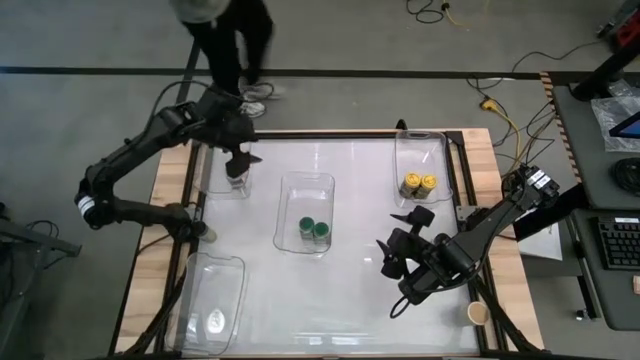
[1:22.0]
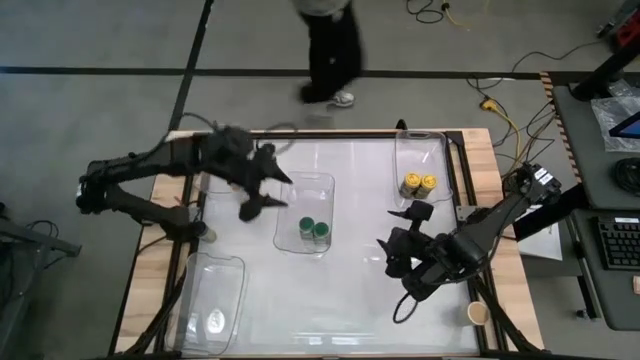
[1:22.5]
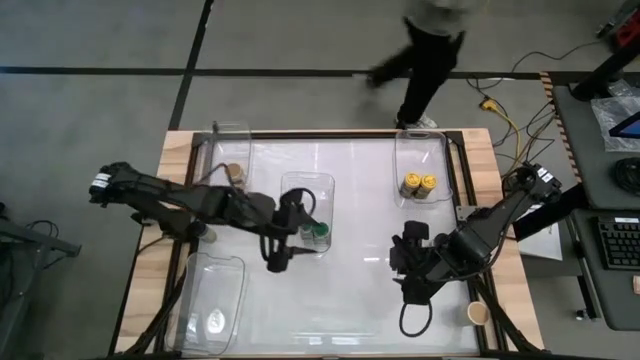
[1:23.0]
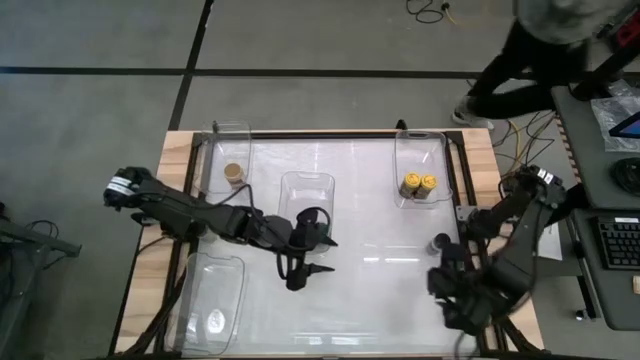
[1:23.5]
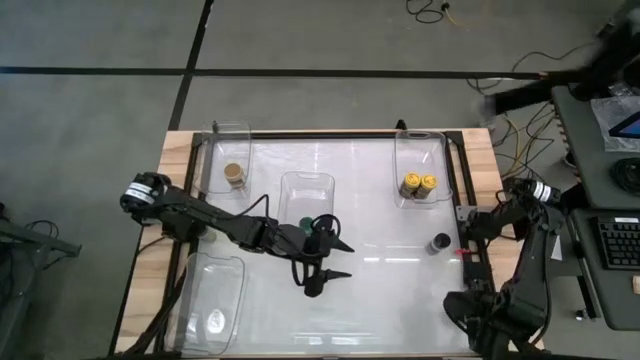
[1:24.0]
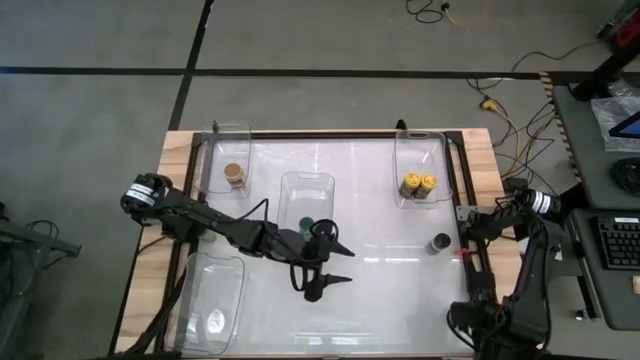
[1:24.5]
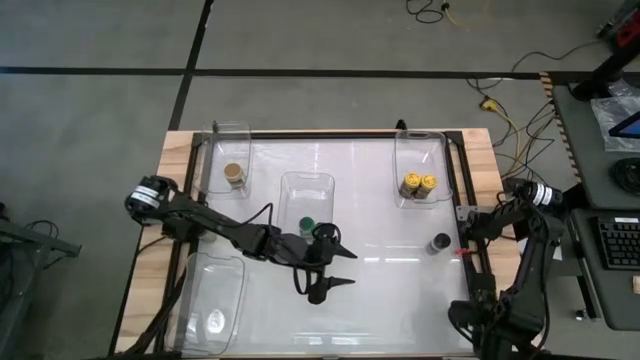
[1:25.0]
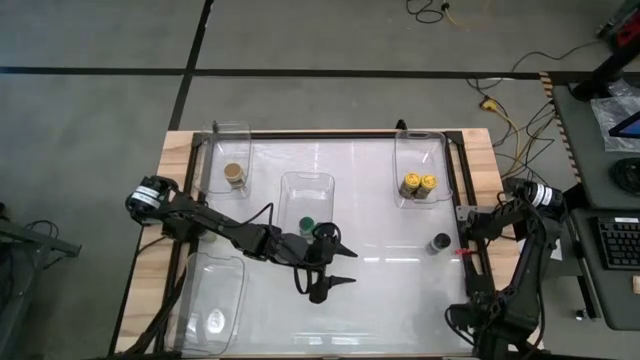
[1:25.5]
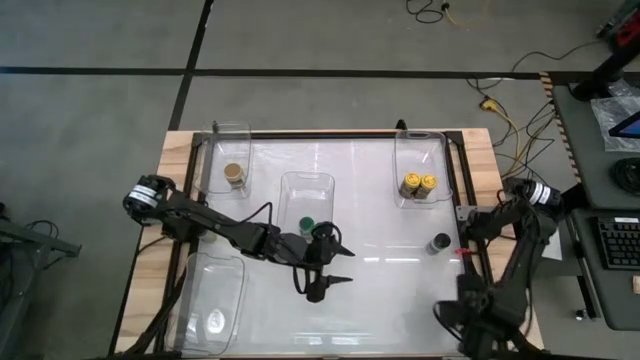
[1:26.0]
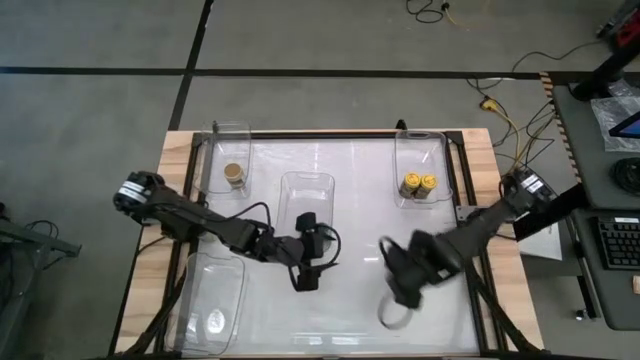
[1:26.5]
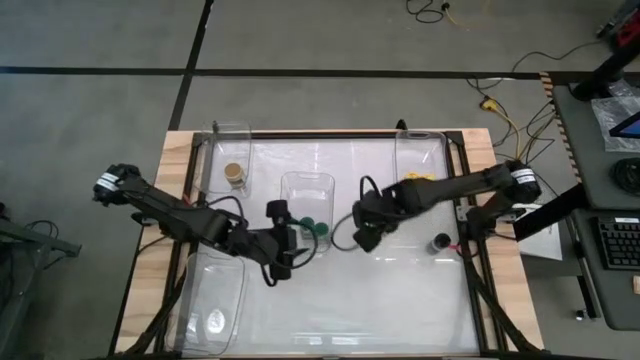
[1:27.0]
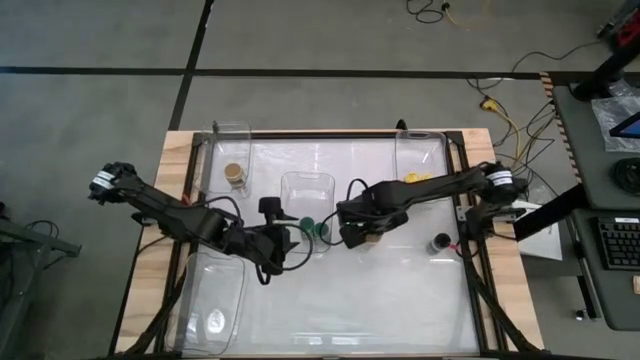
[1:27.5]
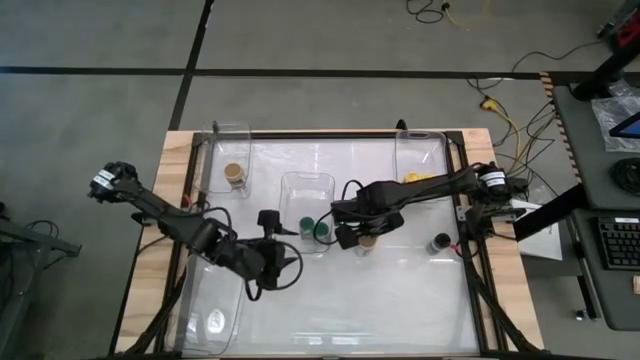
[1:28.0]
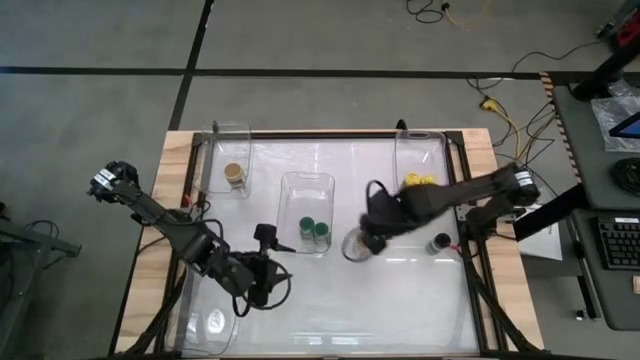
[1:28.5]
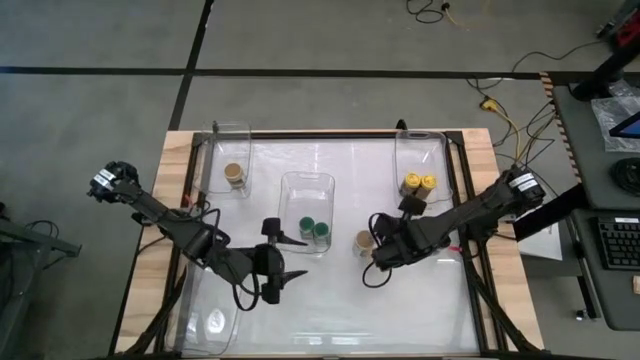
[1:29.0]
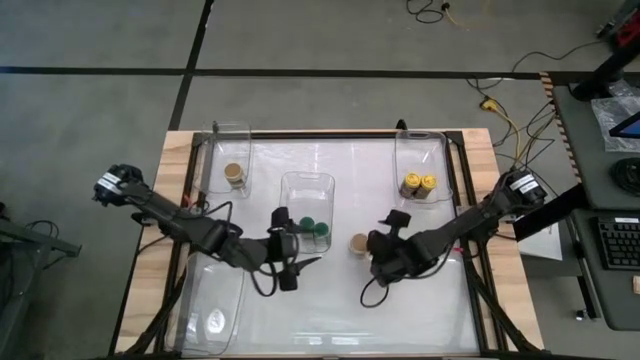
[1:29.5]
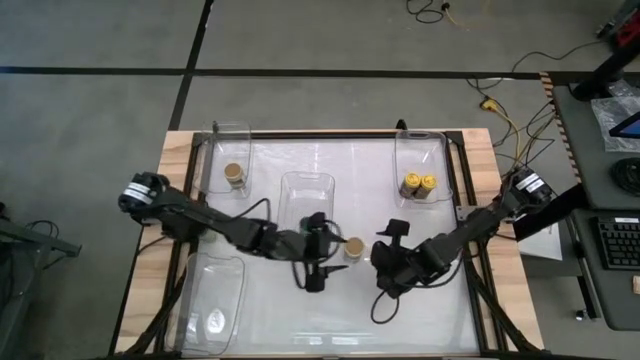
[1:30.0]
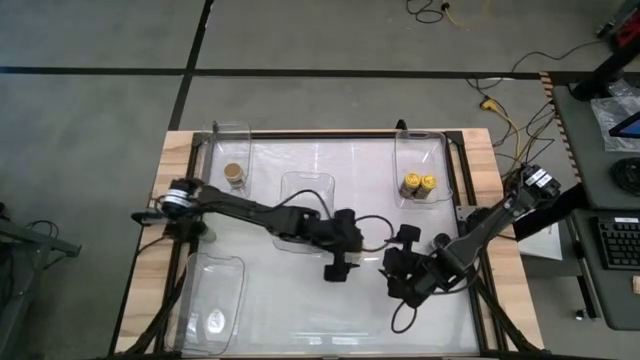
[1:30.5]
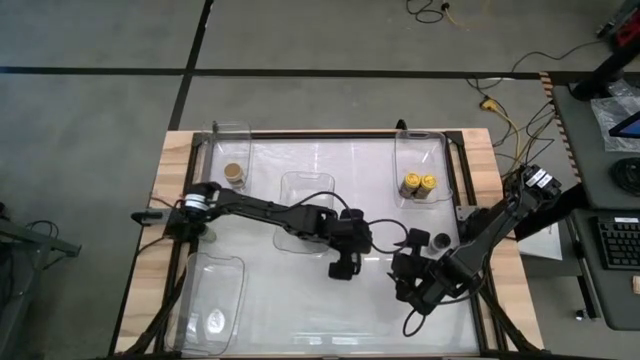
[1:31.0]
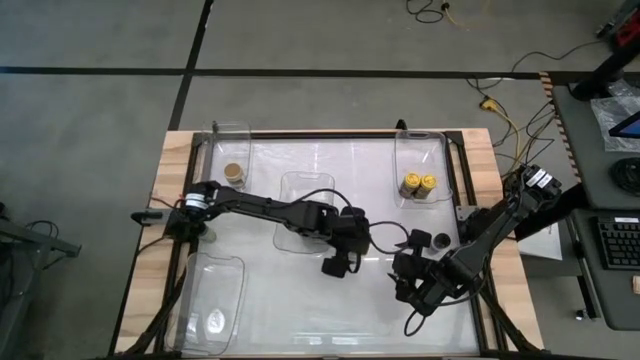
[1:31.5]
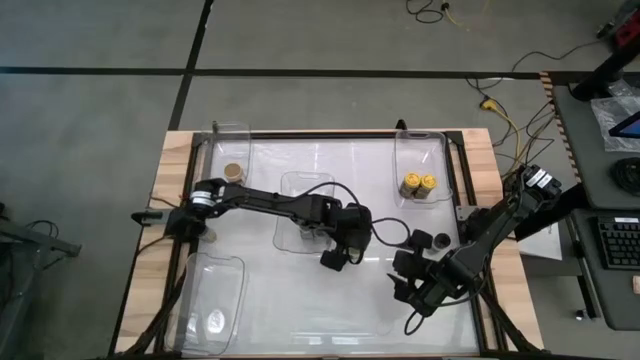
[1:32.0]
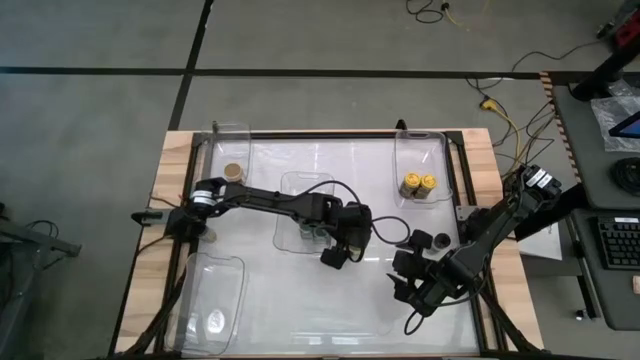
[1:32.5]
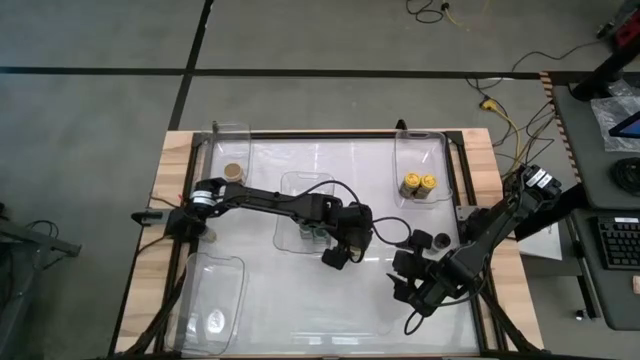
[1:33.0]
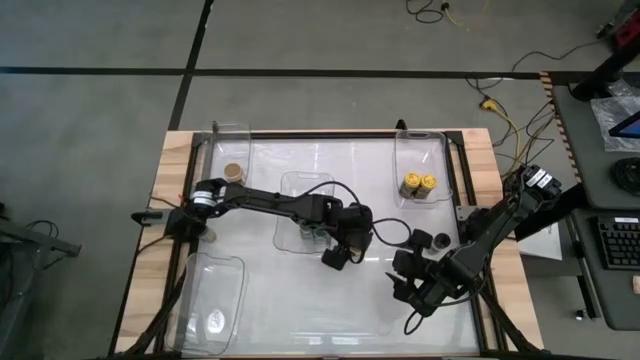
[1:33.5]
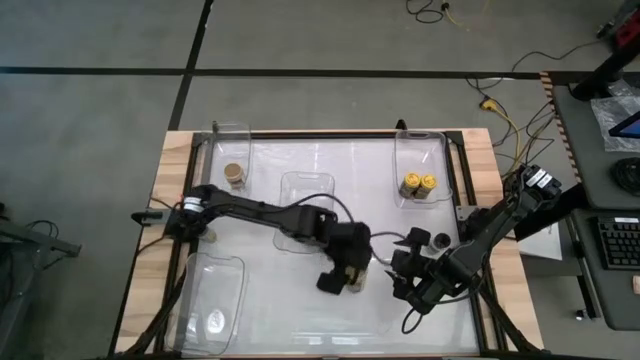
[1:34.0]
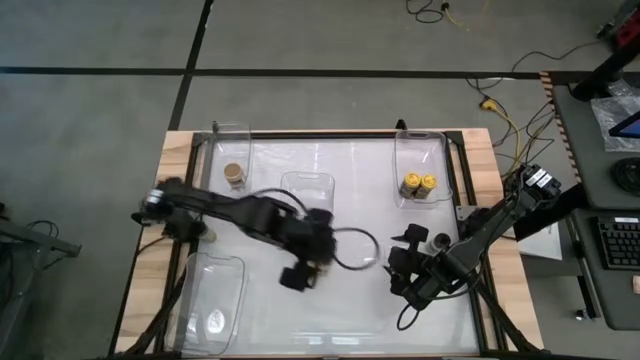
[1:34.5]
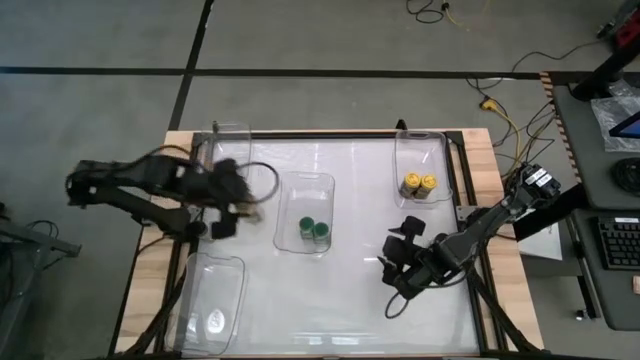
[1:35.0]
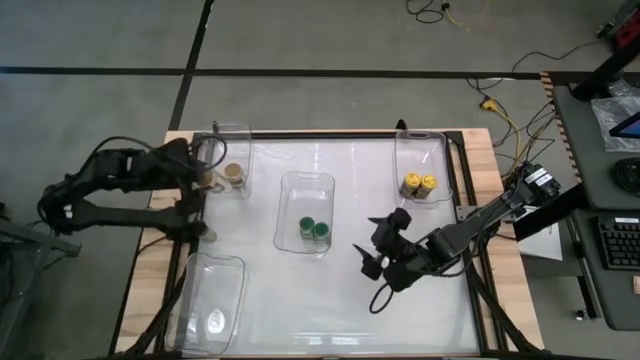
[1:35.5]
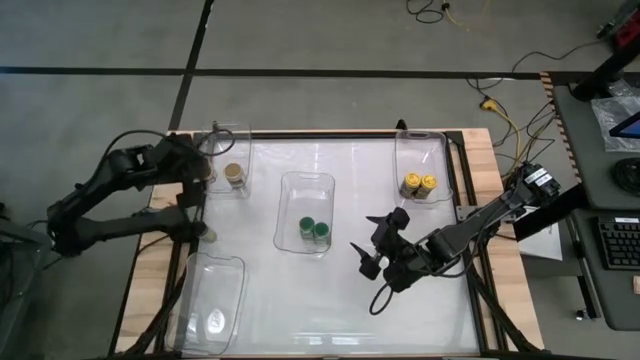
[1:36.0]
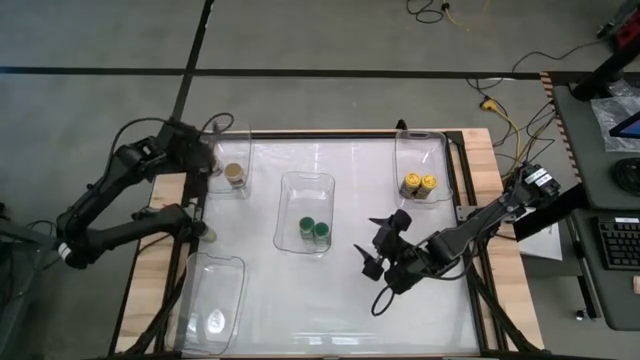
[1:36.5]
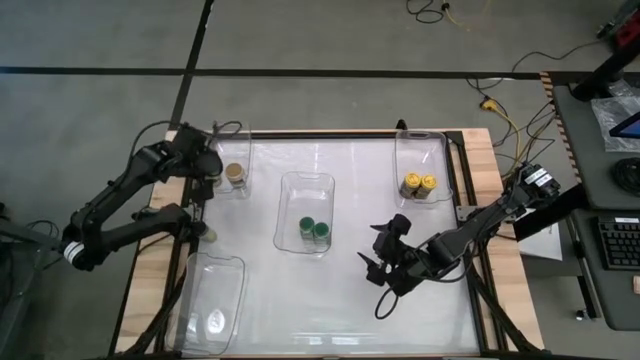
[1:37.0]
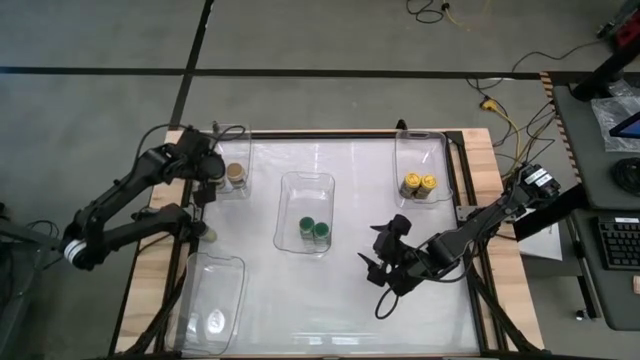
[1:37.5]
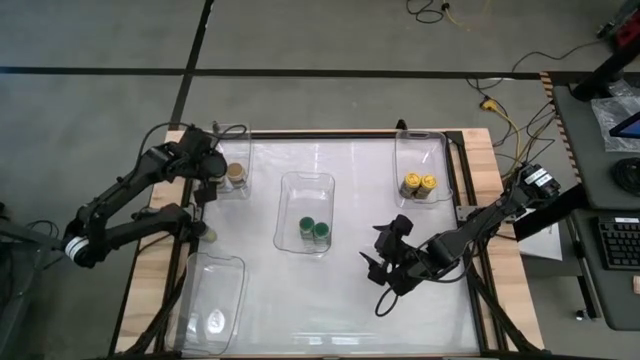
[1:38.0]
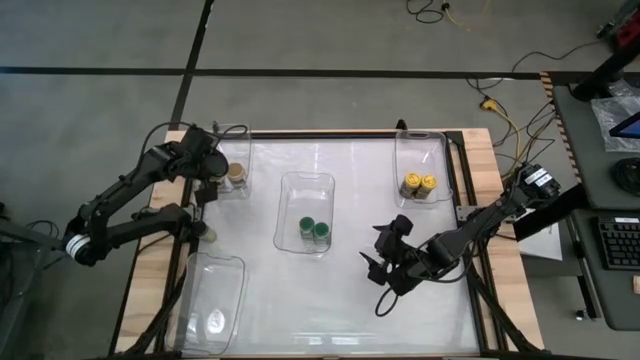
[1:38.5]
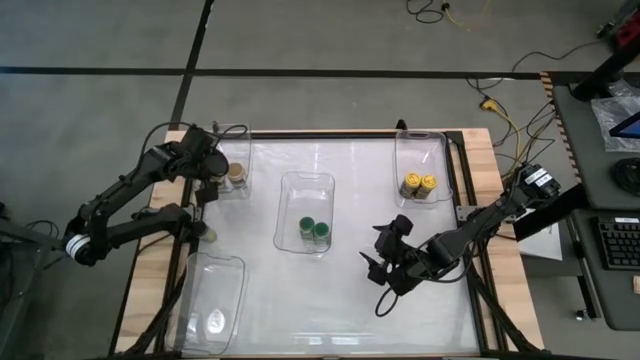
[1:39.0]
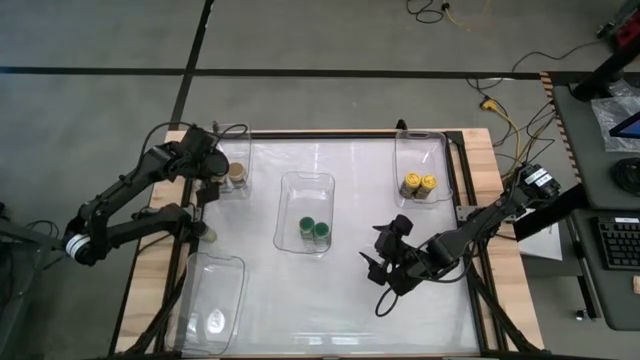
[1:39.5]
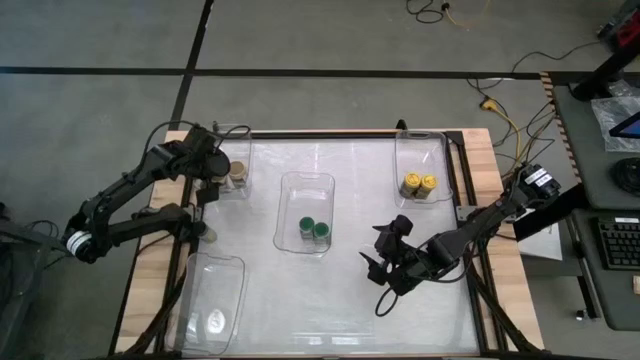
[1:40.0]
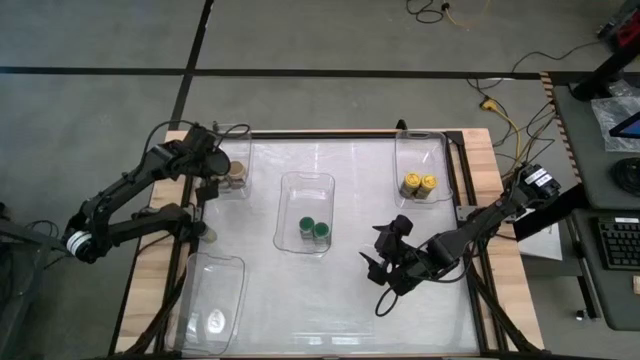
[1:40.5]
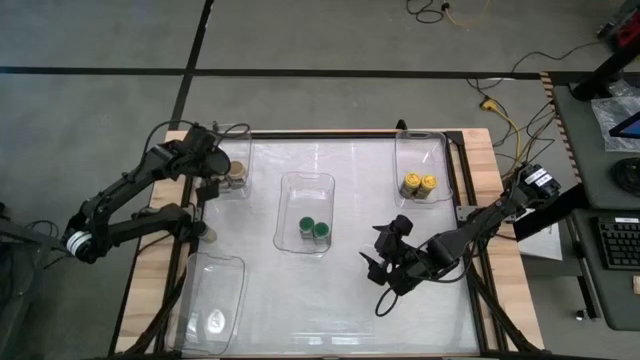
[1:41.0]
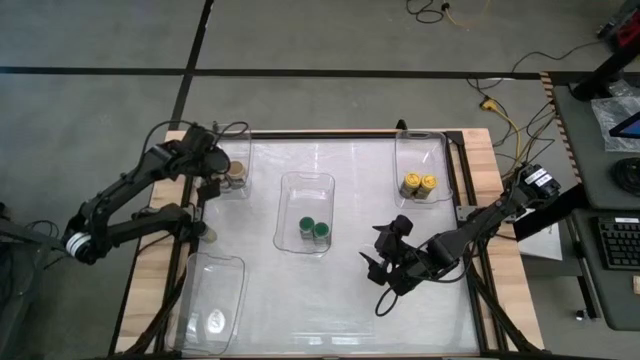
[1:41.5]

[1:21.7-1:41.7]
Task: Sort spices by type
Put the golden seasoning bottle into the top left transparent bin

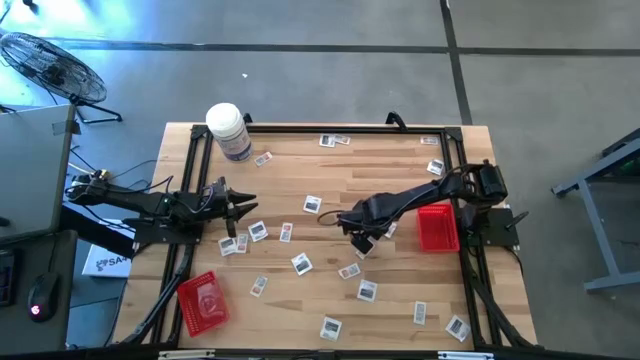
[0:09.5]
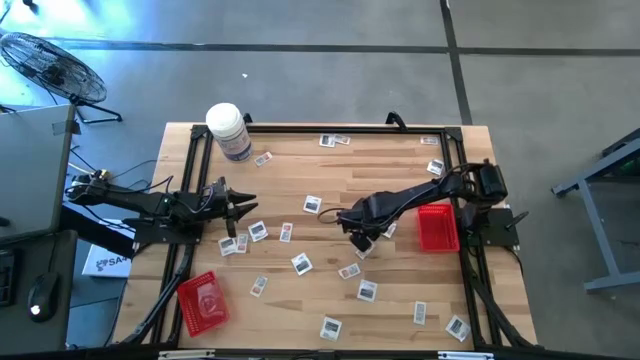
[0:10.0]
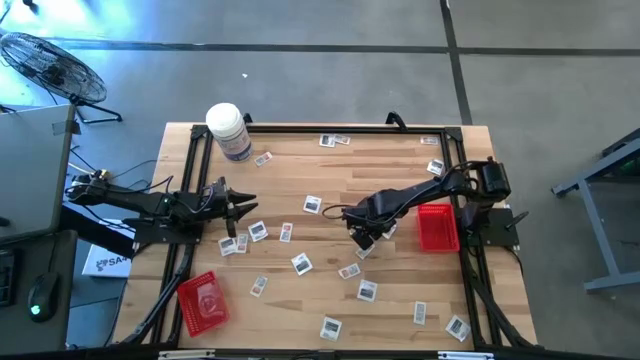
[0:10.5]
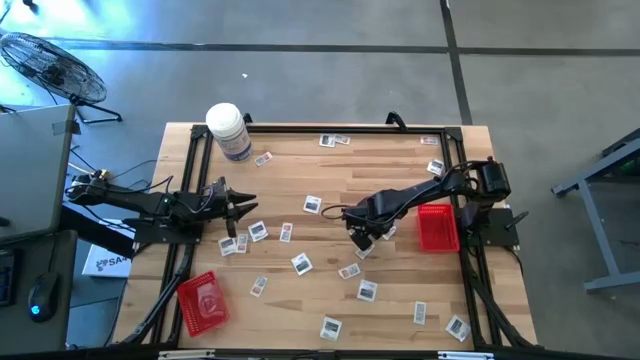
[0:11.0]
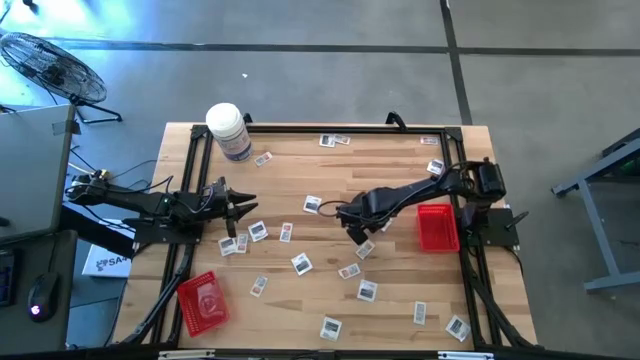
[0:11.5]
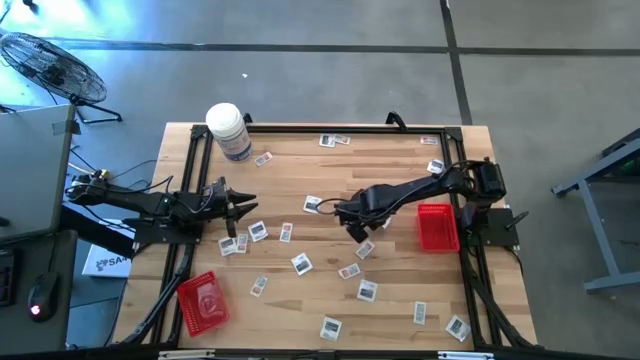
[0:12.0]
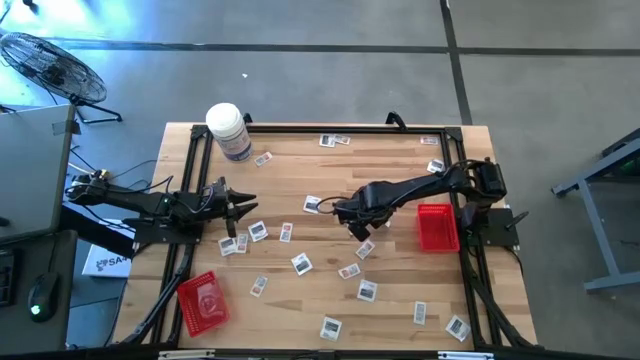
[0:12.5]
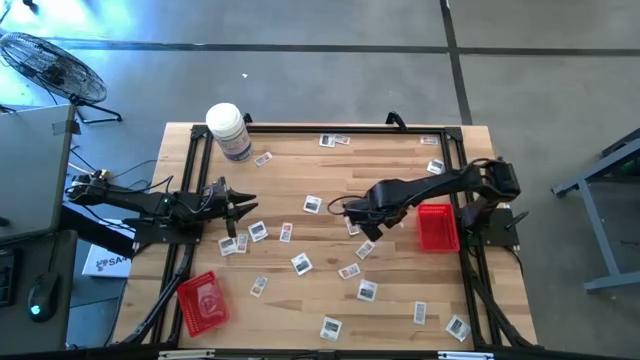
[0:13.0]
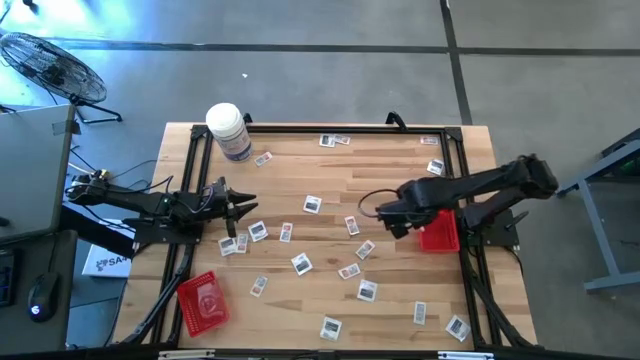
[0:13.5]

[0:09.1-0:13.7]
Task: Pick & Place First Aid Supplies
Put the towelette pack into the right red bin
